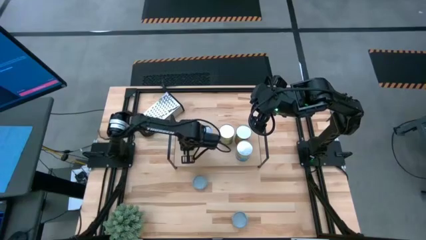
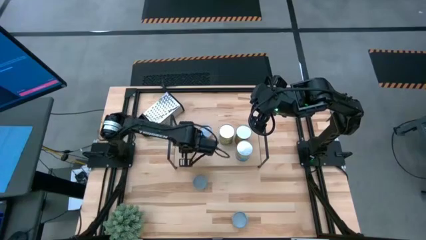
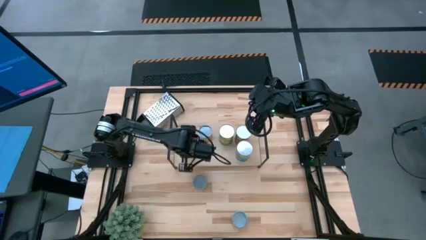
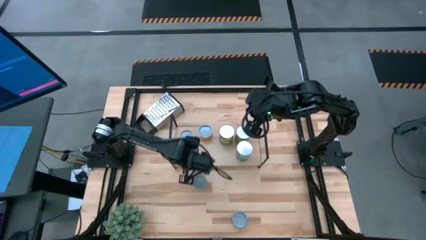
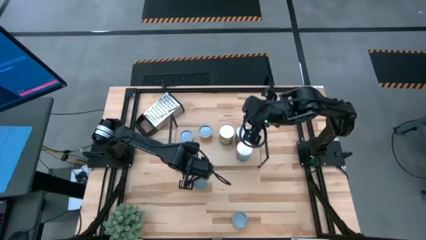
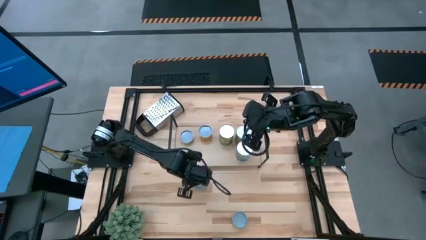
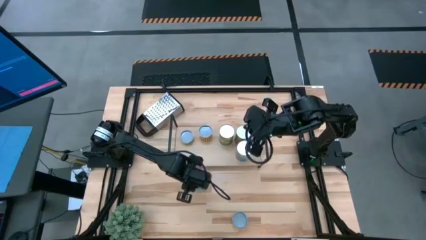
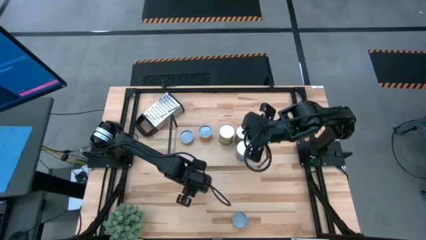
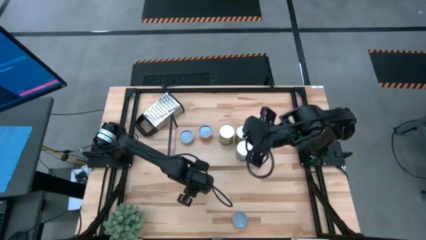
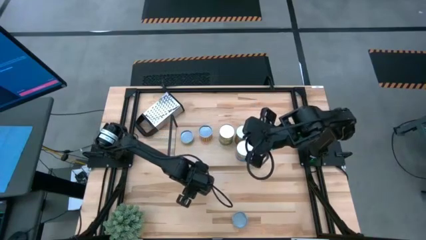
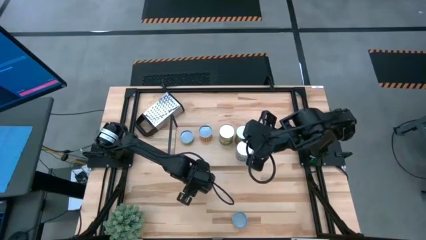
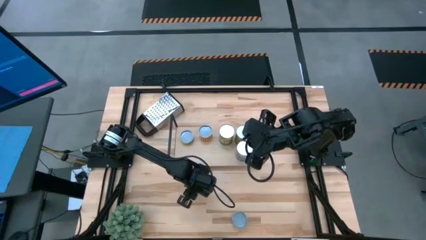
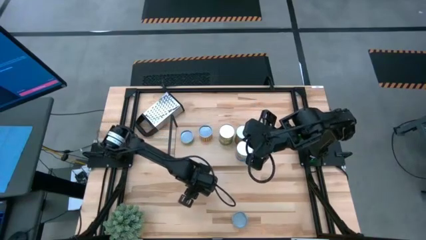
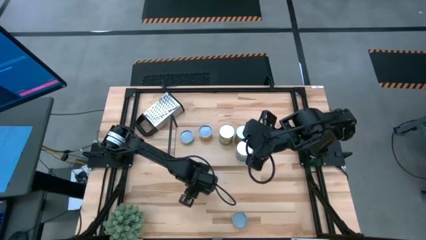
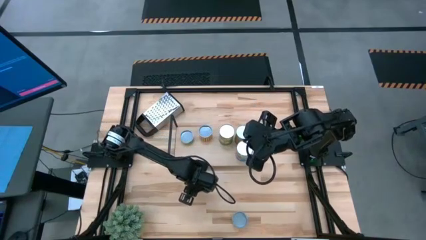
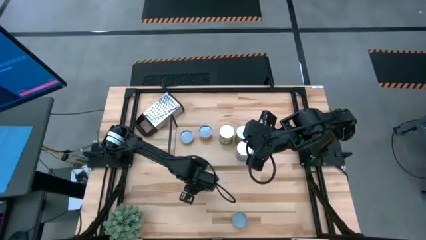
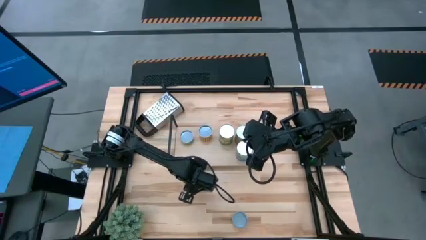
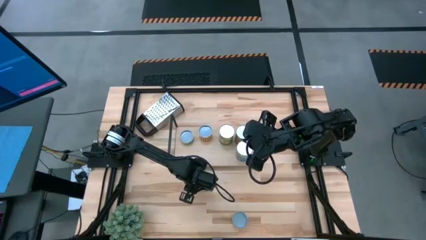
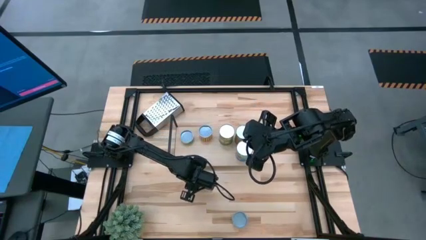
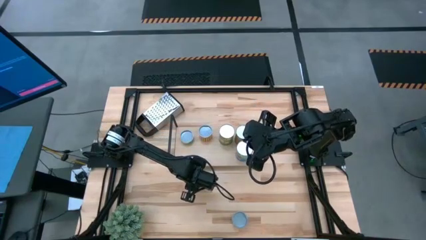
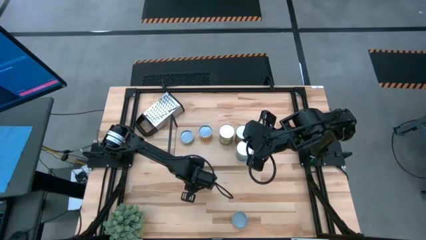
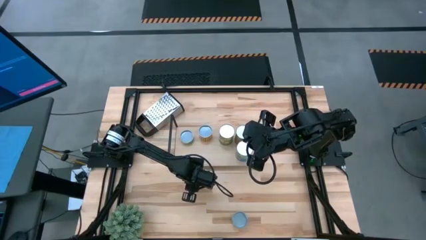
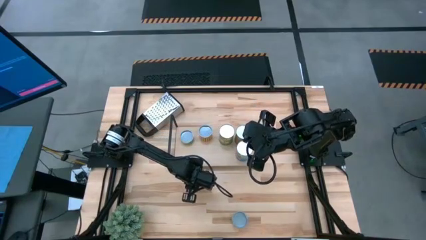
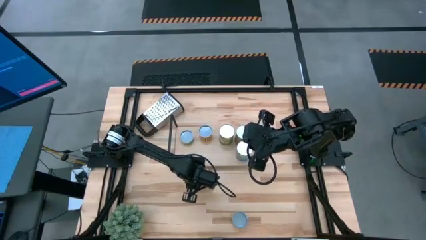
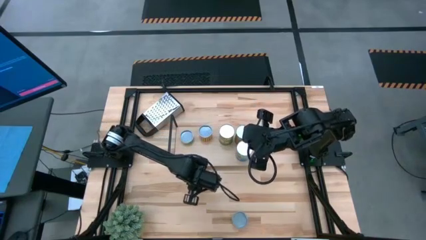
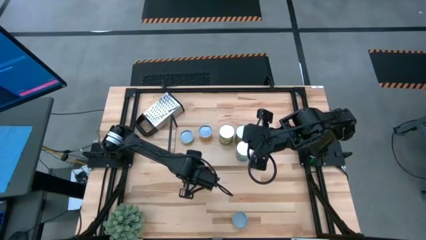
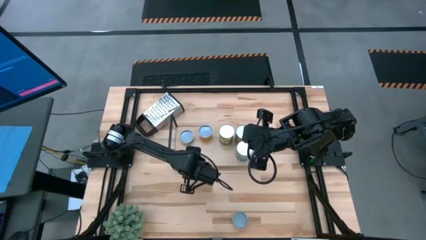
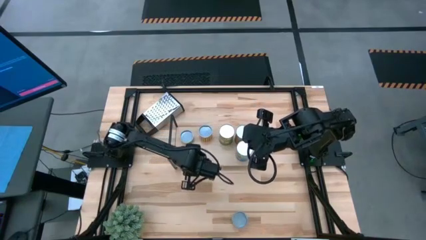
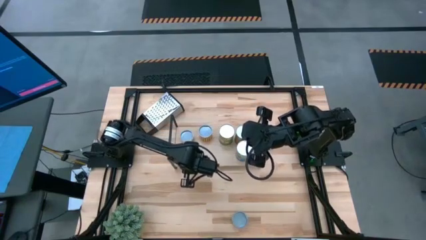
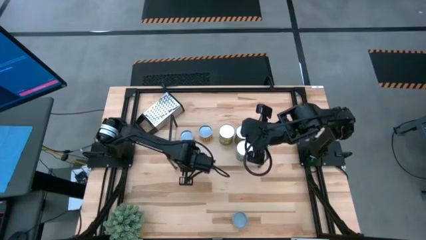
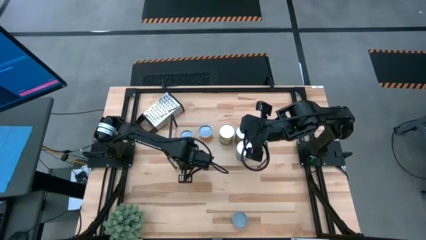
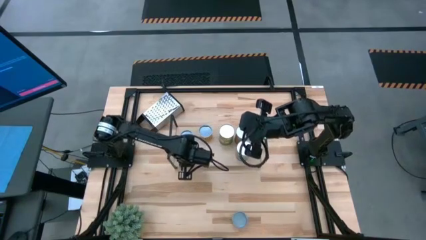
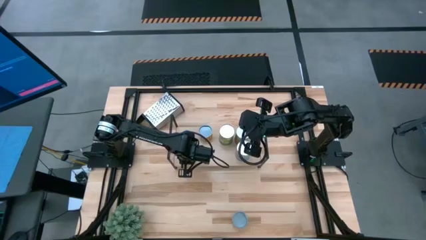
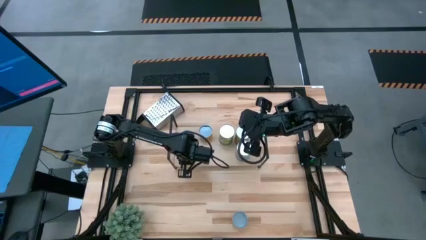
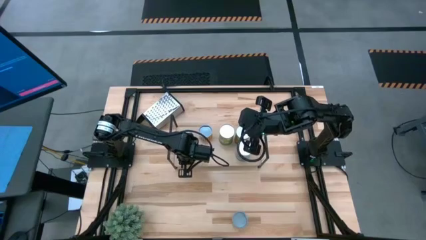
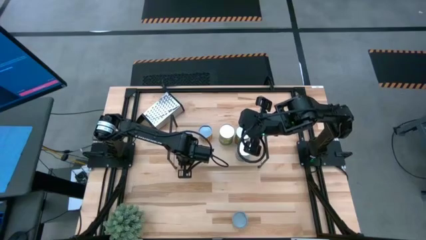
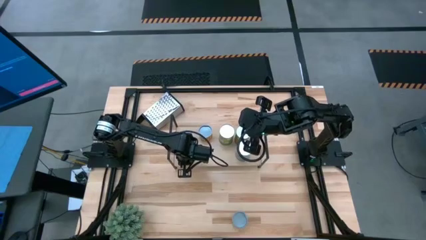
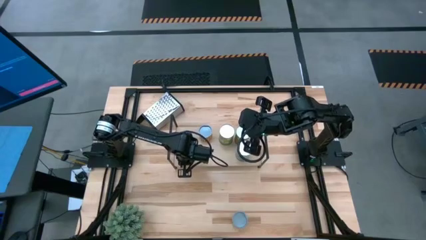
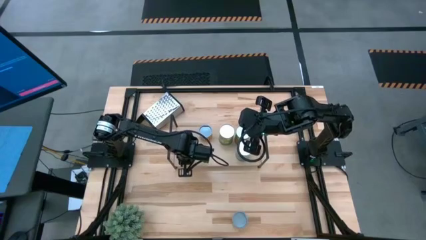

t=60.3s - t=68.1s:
Task: Pick and place cans onto a shelf
Put the canned salmon on the shelf

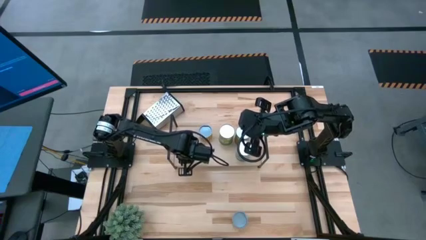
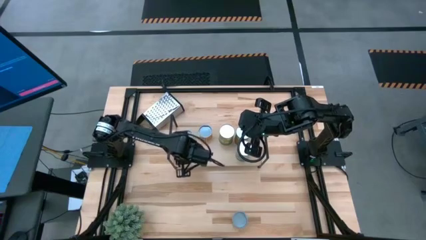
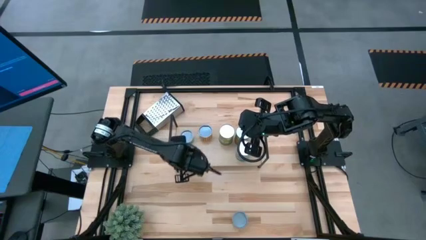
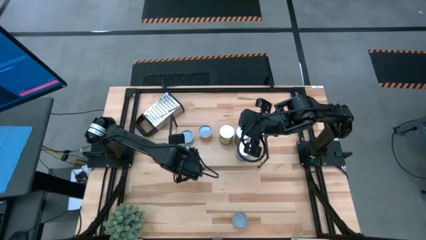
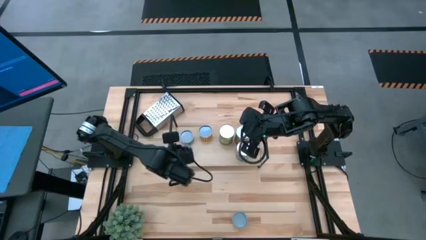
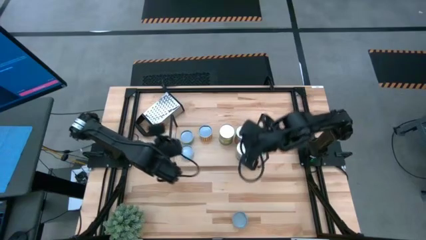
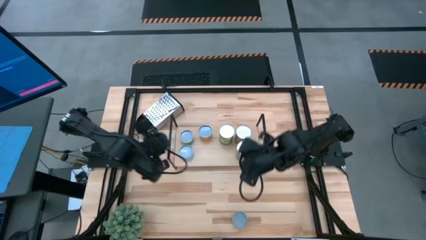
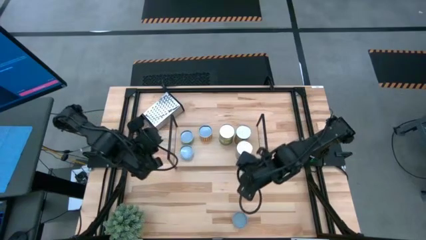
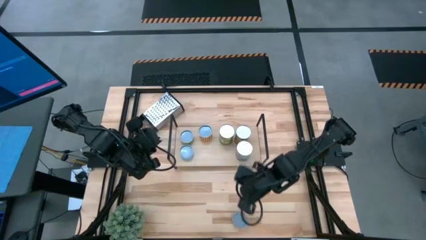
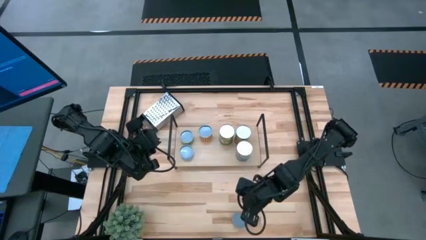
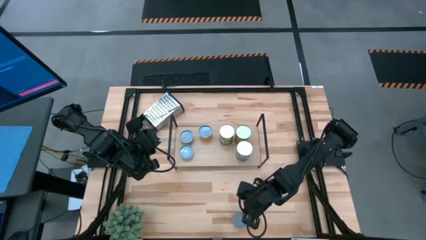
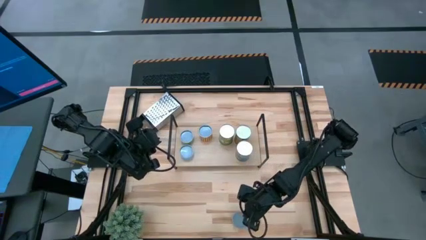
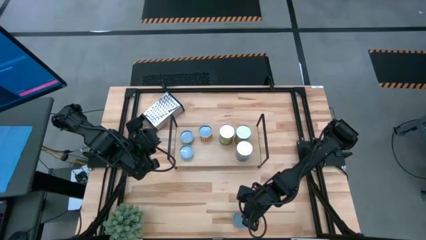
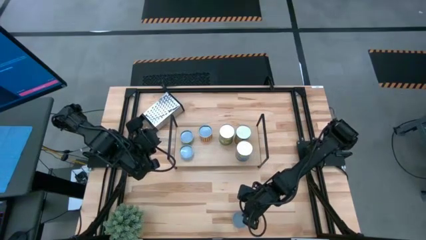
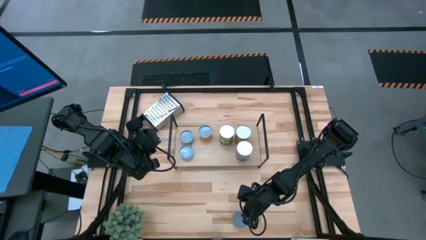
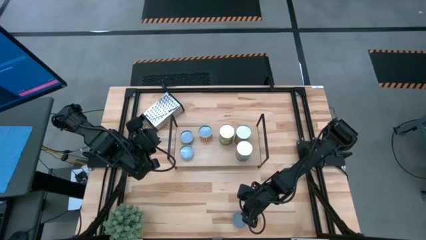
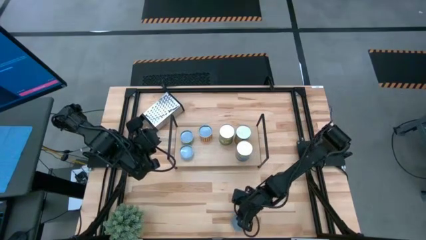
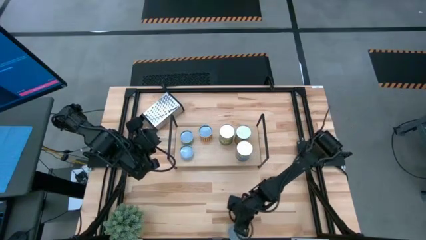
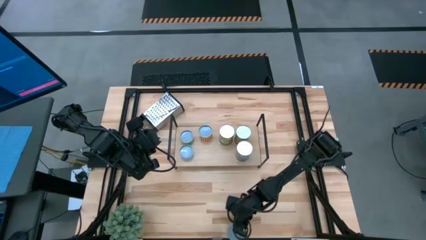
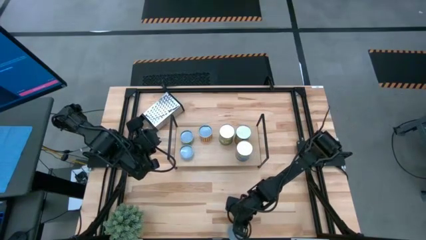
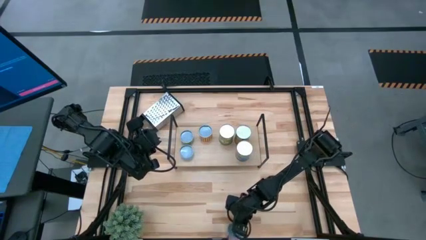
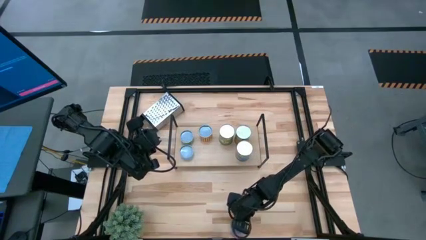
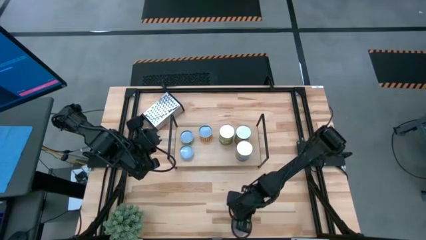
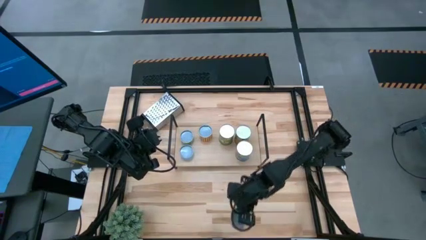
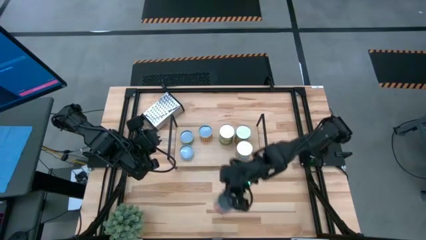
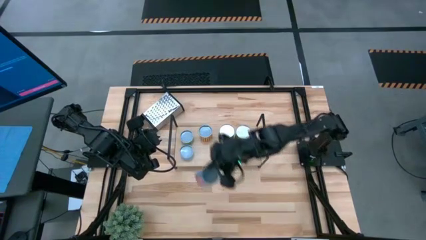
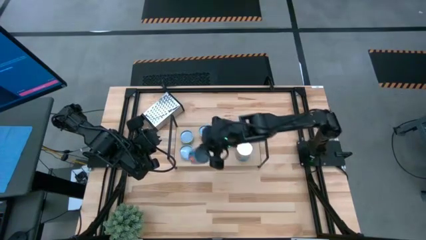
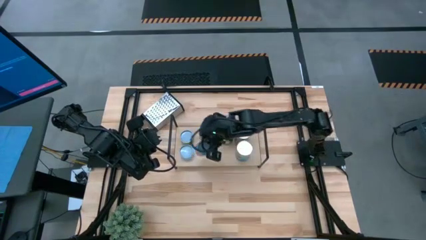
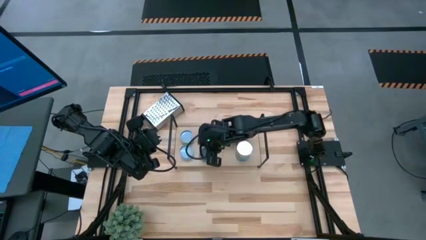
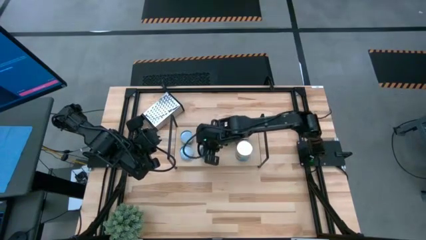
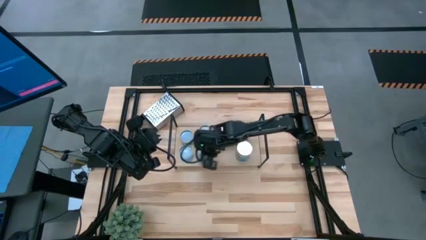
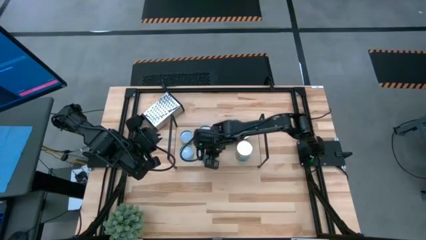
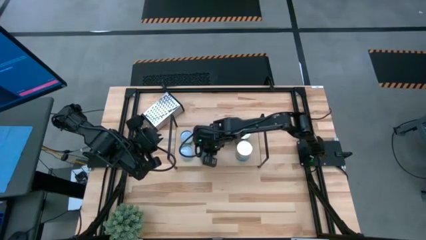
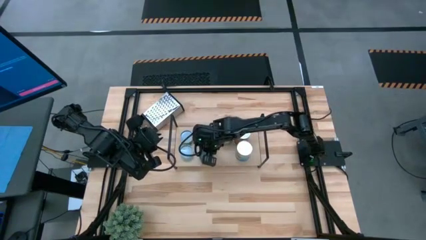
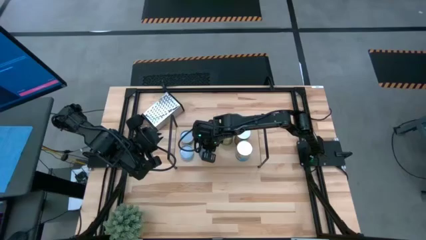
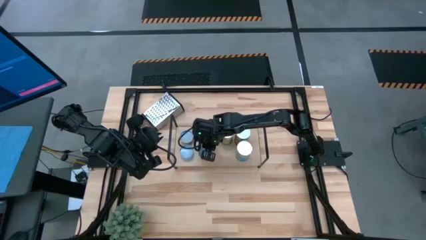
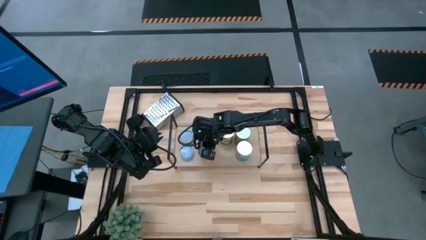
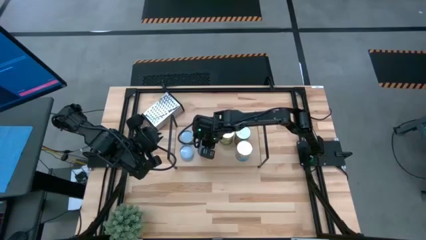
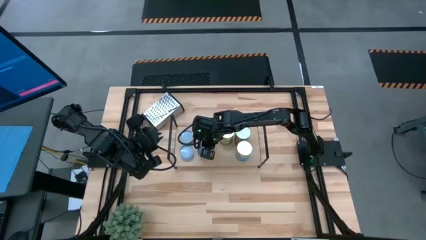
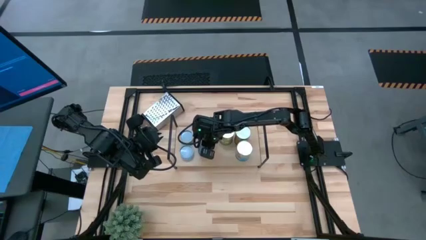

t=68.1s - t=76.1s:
Put the canned corn on the shelf
